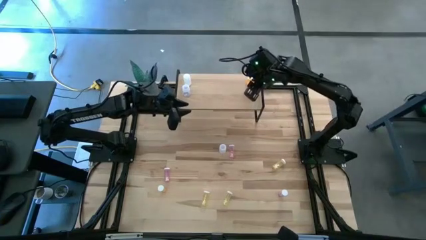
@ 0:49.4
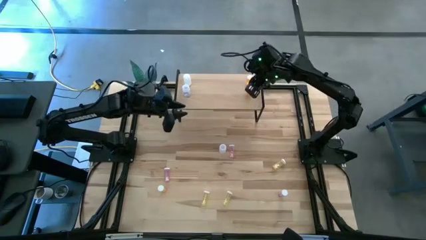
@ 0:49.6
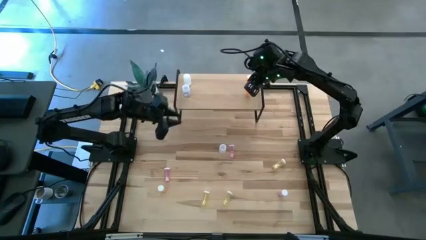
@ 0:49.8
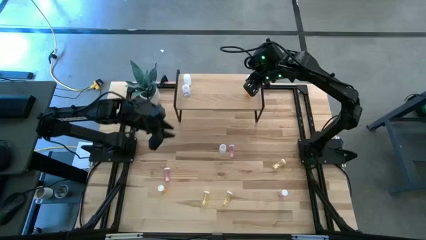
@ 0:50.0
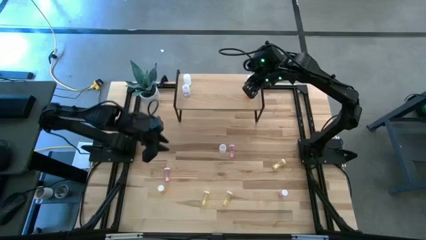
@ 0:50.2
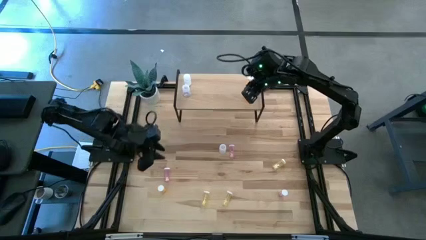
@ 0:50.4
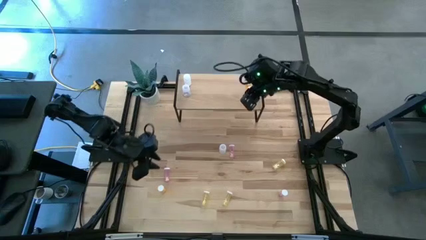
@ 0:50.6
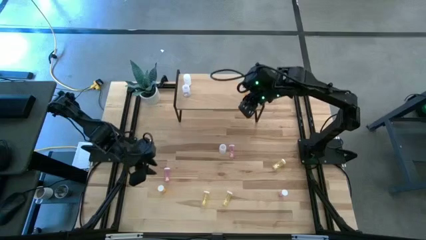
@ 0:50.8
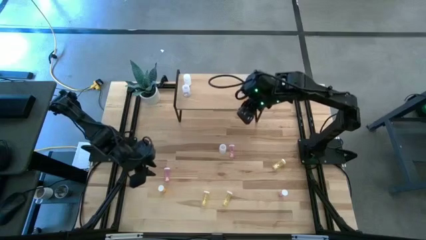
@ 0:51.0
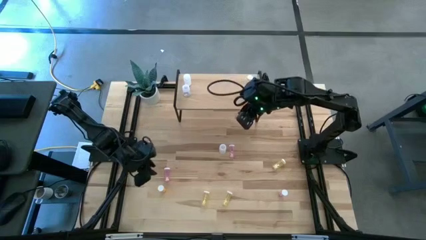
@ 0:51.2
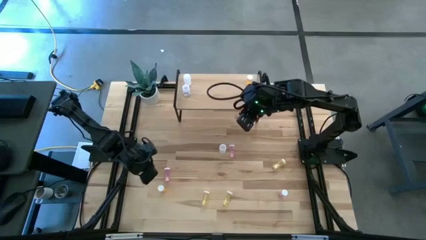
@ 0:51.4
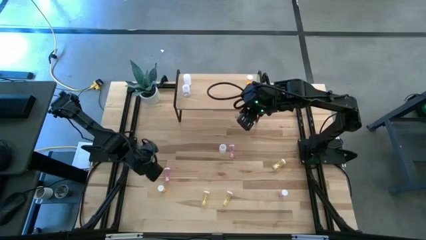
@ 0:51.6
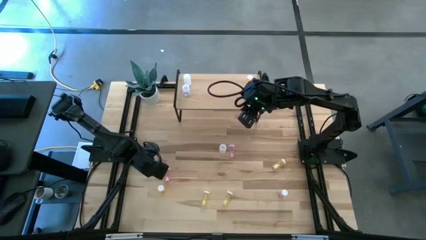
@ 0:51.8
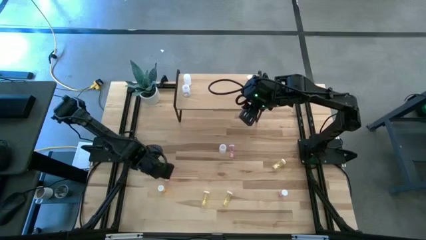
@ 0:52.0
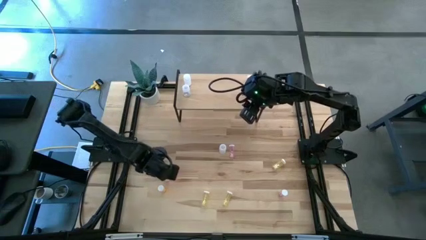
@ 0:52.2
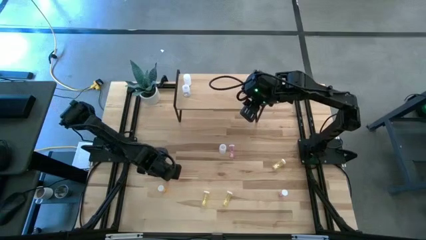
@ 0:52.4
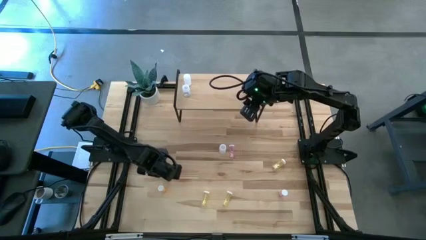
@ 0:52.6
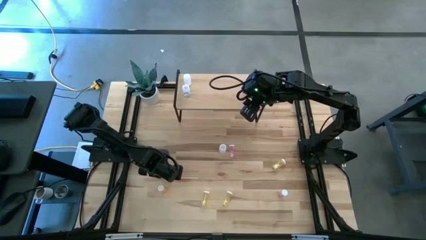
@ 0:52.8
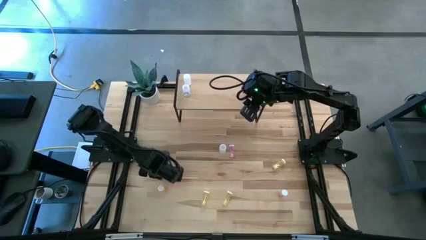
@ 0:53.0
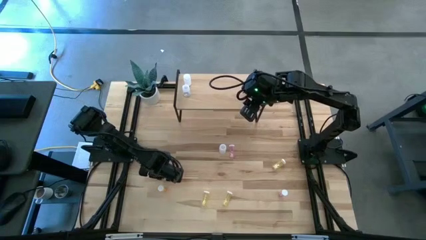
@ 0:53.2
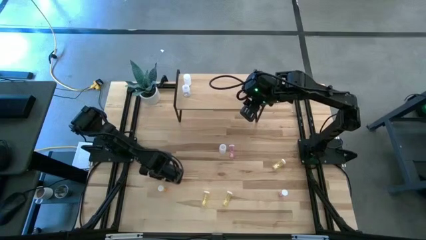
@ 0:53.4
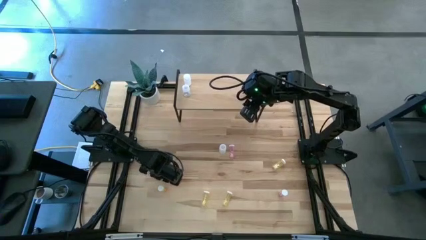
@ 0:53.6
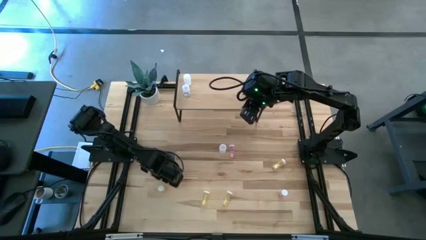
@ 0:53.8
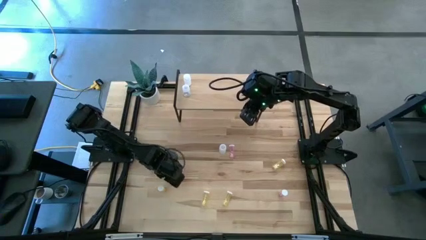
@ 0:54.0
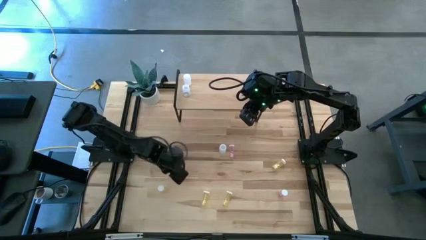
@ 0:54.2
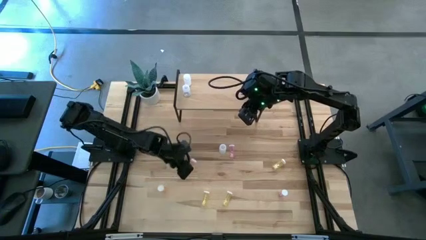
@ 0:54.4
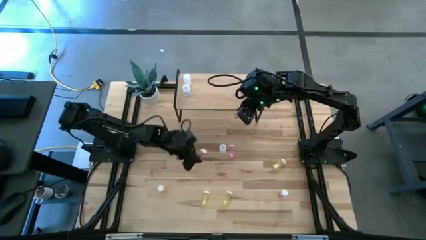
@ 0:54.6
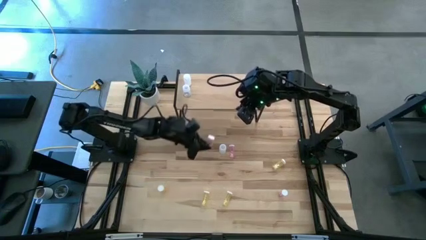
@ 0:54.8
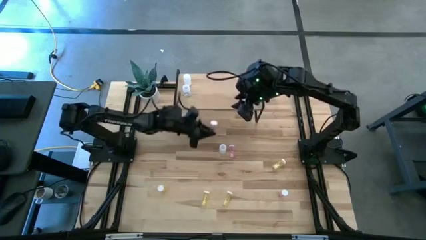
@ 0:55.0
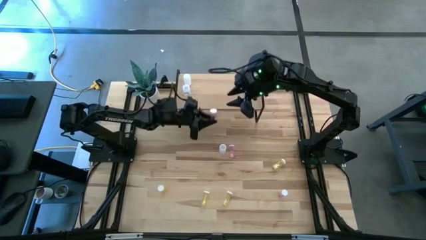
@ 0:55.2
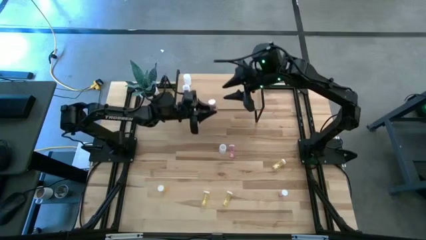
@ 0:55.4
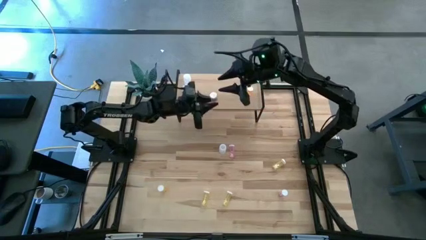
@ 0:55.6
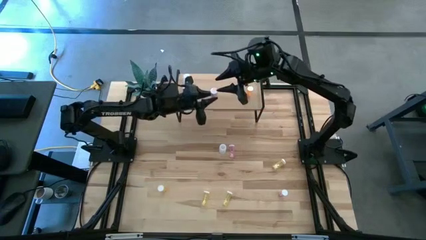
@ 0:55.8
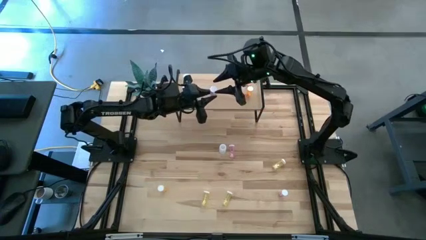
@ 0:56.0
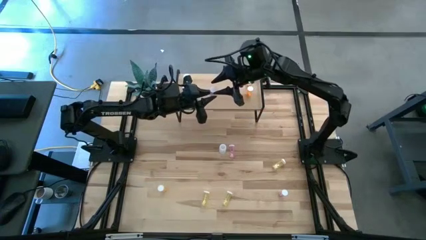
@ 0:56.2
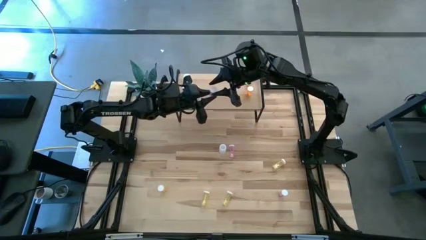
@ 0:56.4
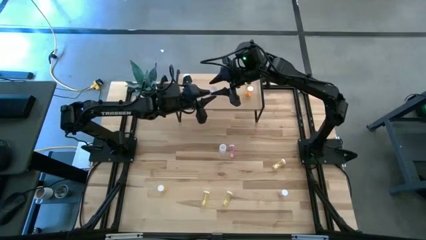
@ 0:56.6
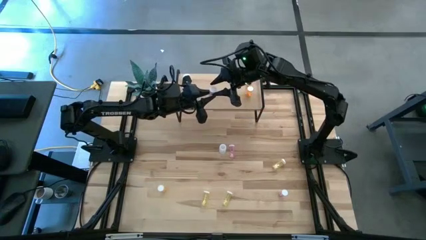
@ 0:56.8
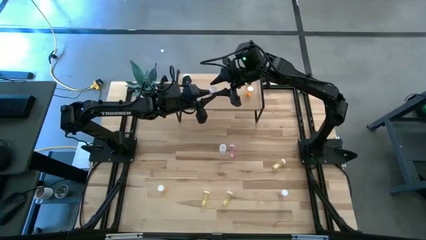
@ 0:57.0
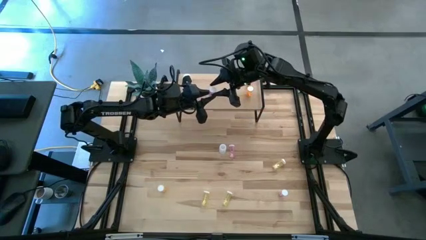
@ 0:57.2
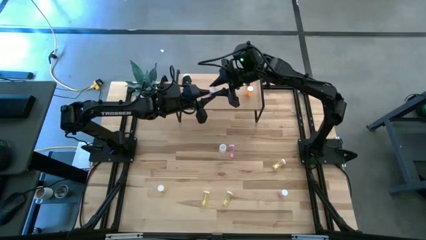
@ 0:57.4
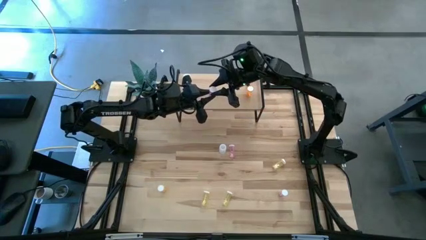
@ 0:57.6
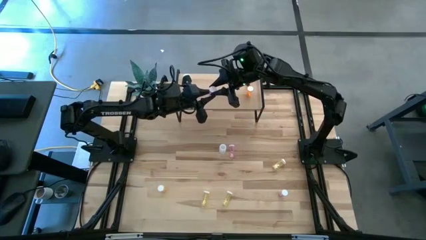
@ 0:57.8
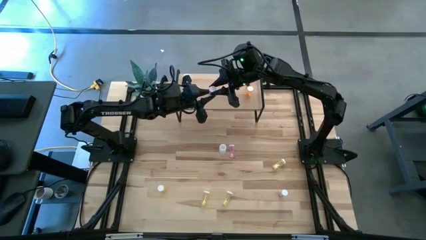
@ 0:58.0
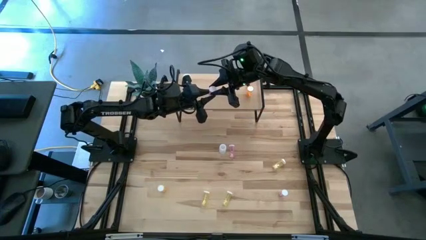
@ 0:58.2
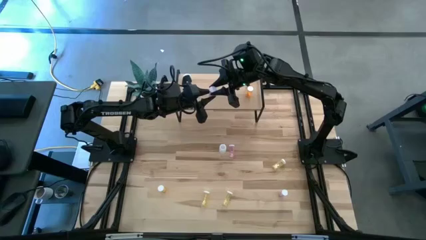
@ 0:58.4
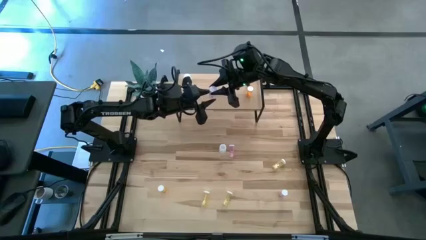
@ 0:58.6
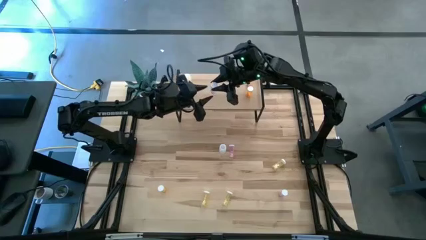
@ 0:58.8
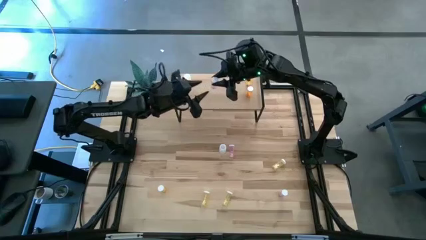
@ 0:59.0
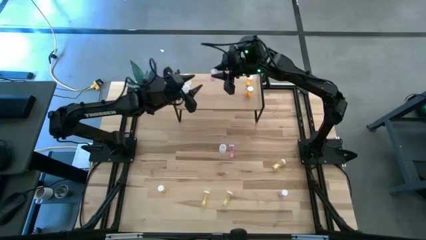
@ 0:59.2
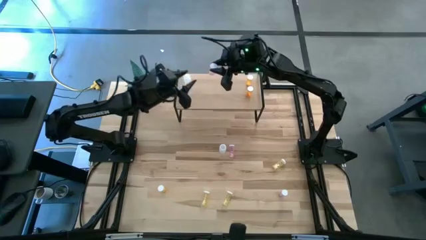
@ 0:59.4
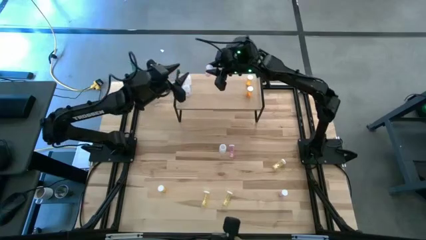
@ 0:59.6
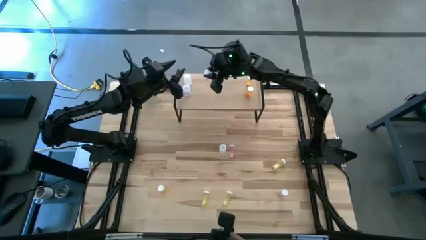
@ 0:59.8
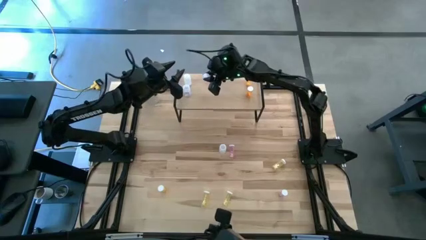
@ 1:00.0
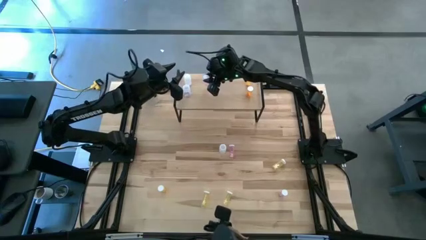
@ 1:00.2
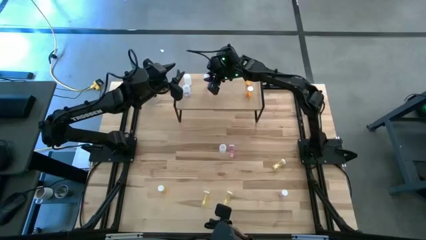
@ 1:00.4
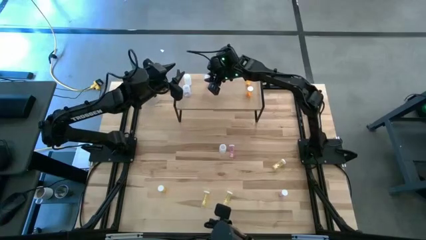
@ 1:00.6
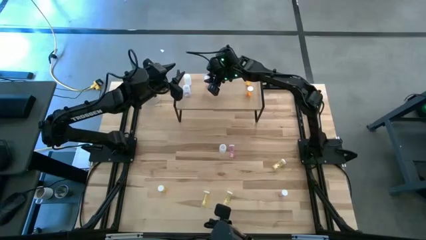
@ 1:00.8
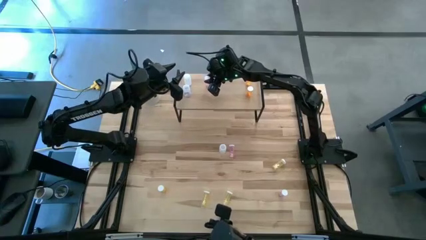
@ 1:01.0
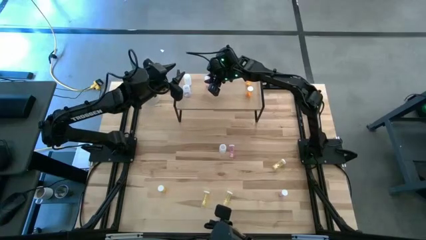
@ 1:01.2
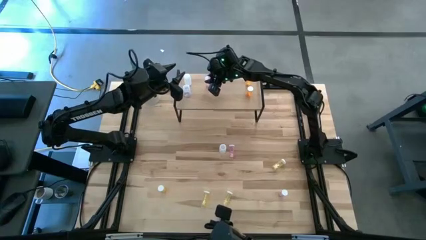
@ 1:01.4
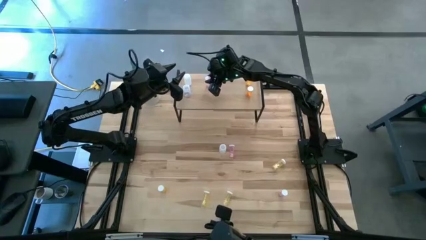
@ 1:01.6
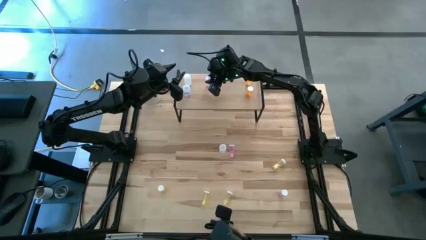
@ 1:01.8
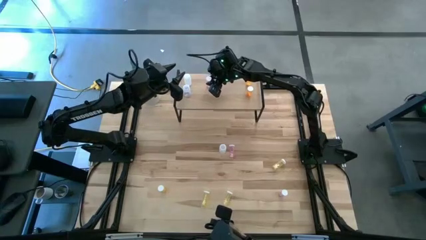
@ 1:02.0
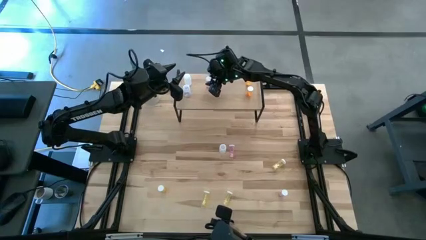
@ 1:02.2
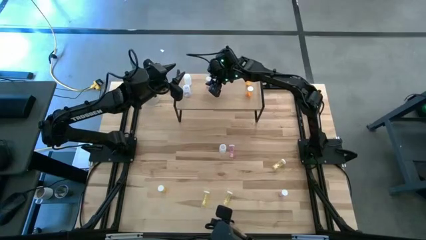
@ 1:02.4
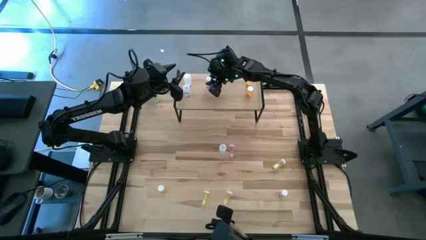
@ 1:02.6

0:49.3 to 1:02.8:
Task: Pick and place medicine bottles onto shelf by color
Put the left pink pill bottle on the shelf
